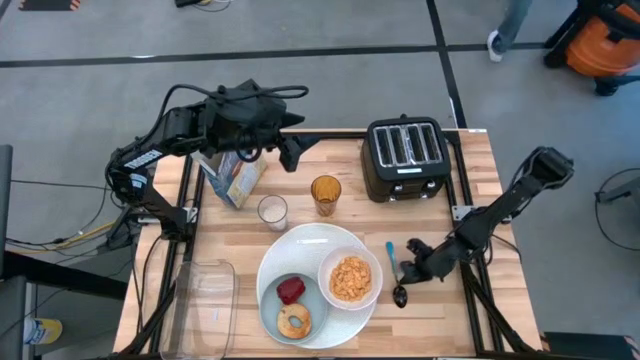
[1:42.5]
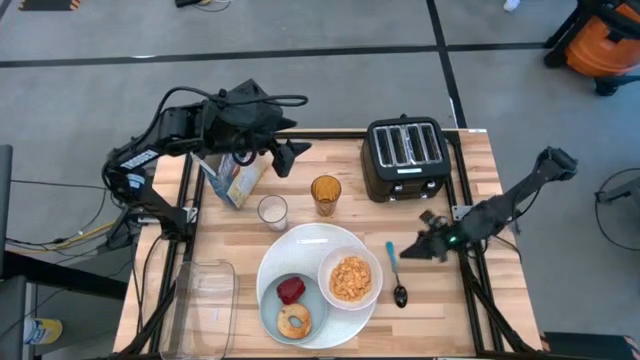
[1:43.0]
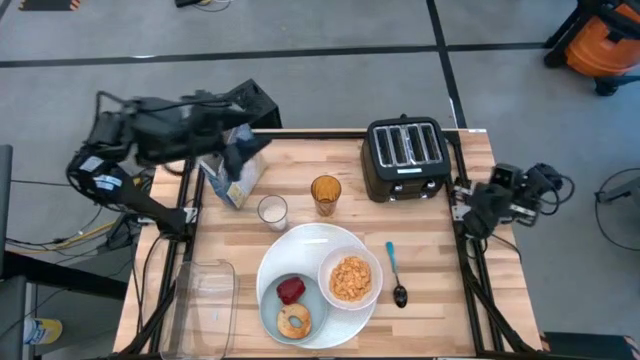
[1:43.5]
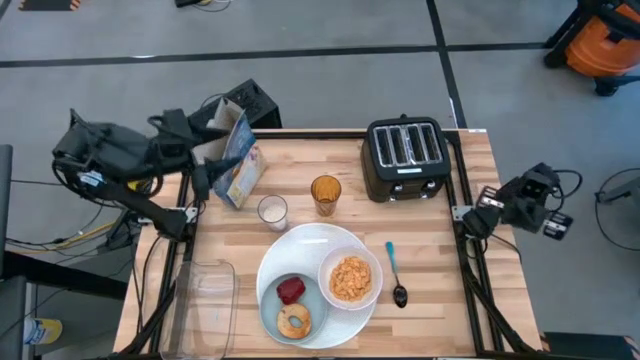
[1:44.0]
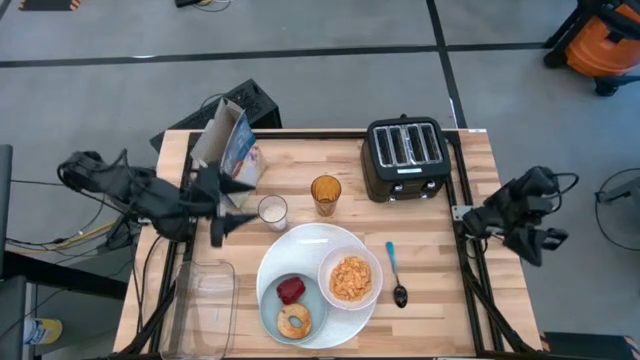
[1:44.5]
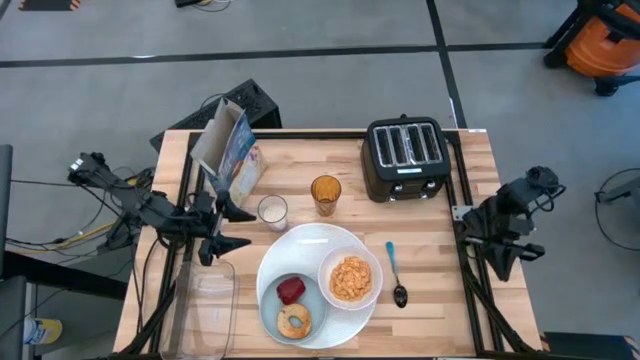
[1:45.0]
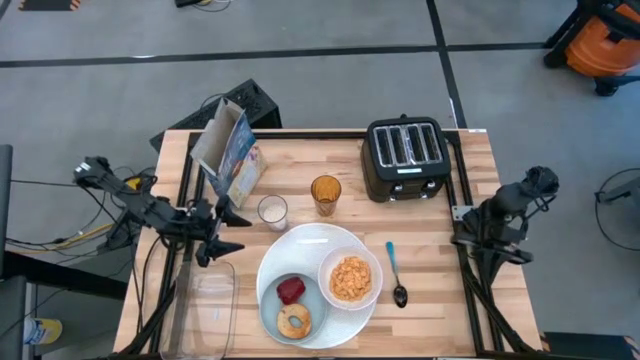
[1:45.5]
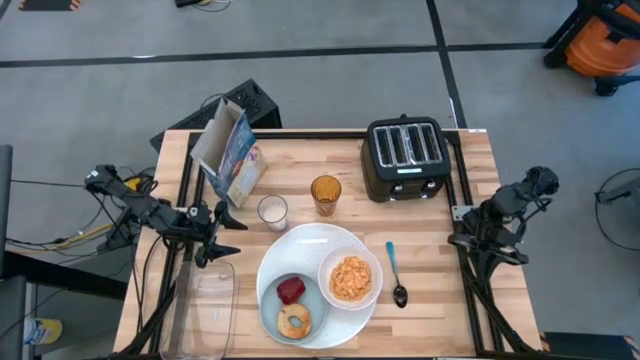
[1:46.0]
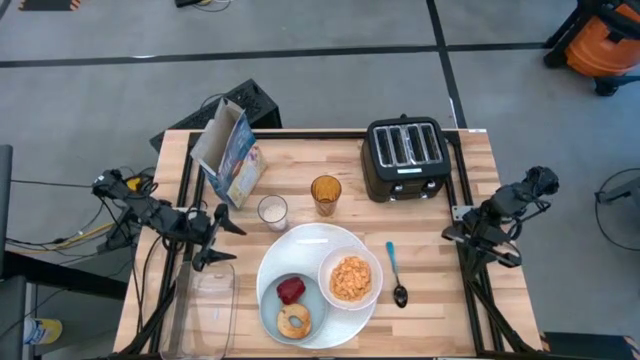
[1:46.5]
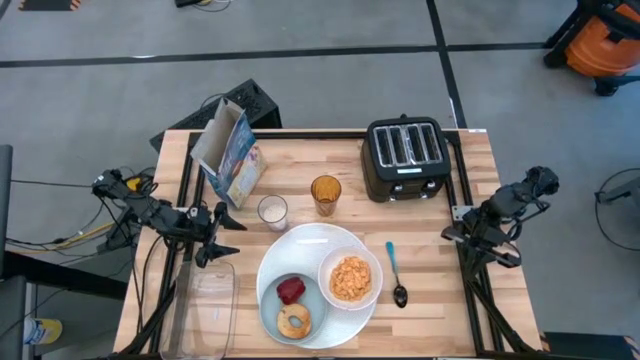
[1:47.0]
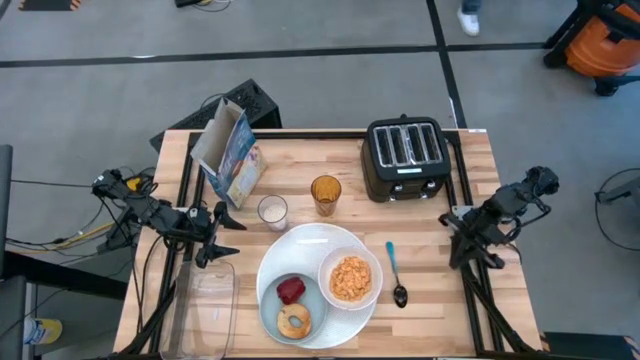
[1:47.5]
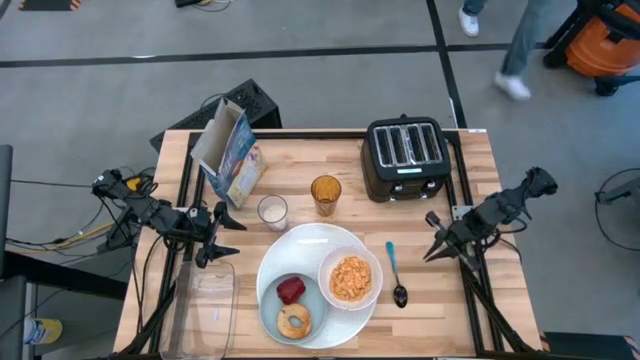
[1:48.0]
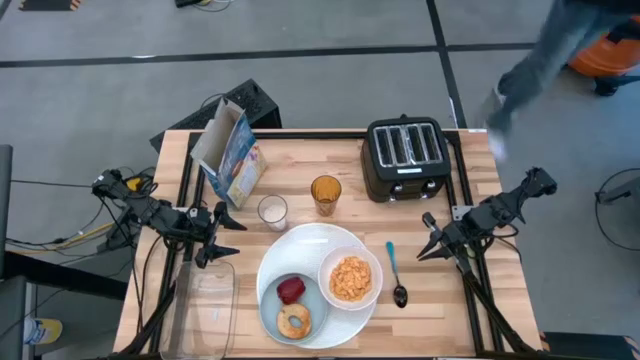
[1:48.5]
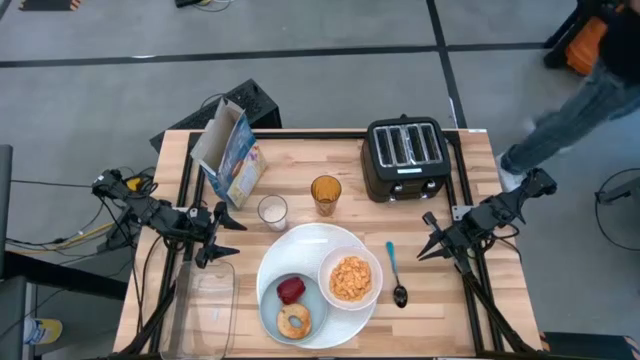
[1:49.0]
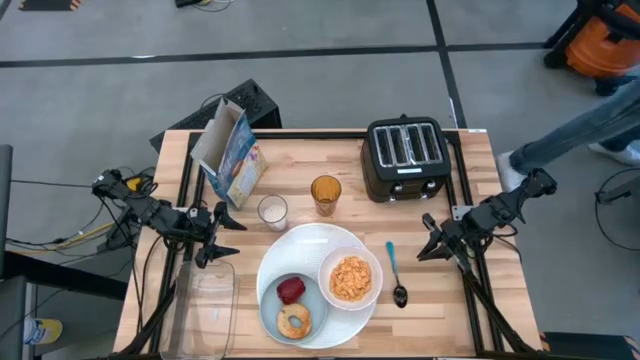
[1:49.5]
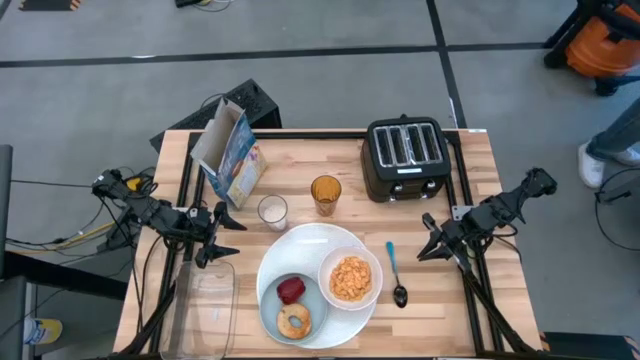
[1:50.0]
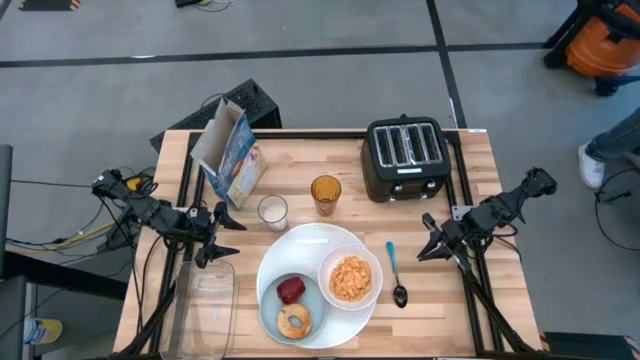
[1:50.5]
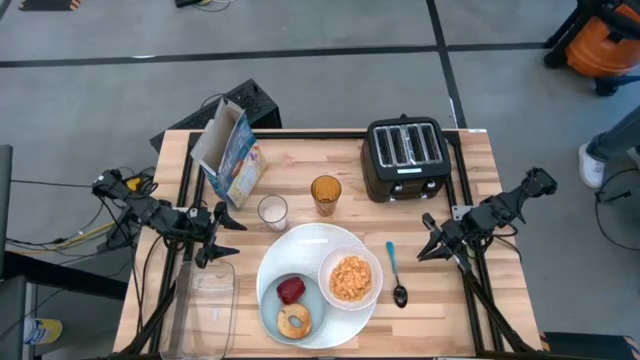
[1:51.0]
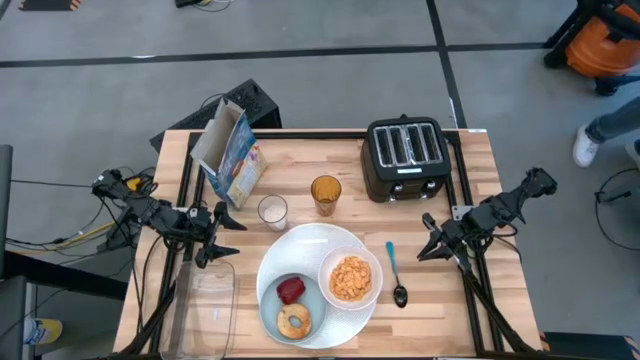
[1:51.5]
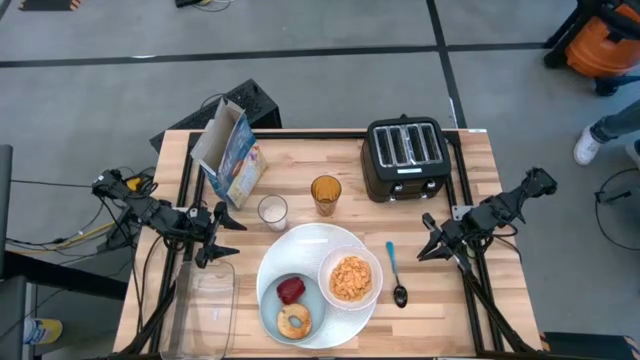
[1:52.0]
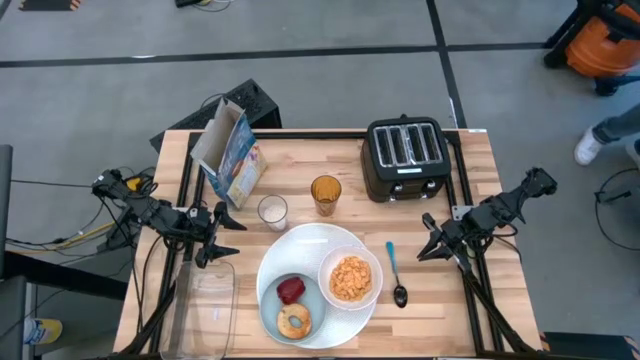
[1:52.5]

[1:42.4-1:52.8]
Task: Arrange a breakfast setting
Return to Home Position

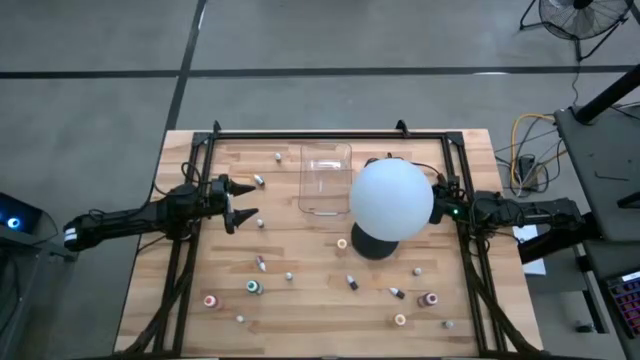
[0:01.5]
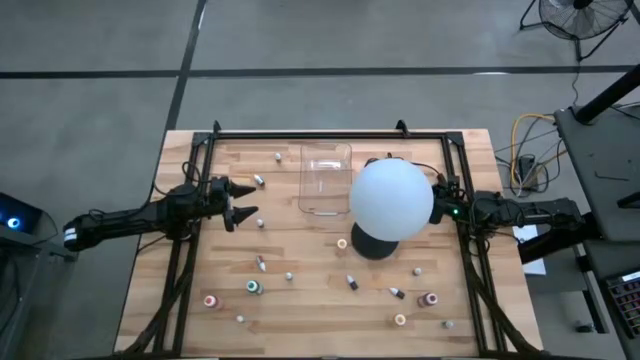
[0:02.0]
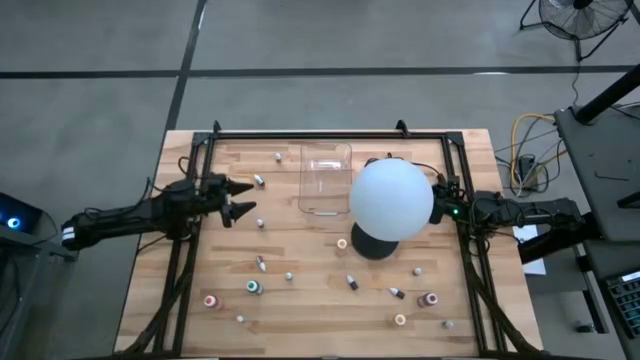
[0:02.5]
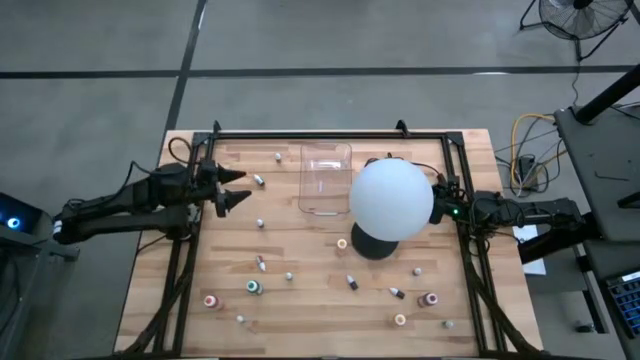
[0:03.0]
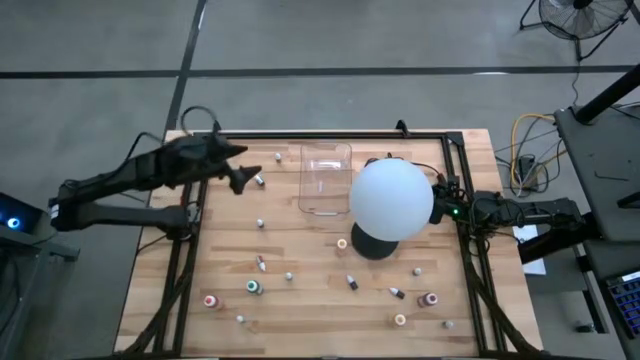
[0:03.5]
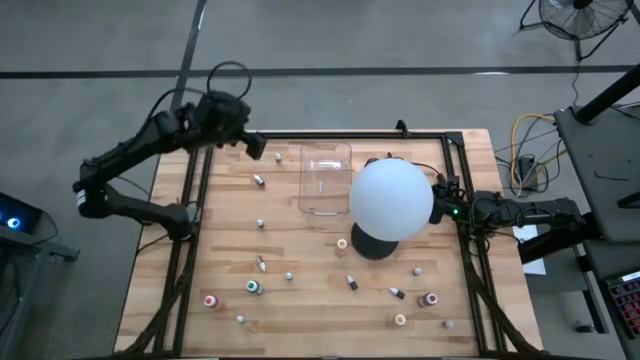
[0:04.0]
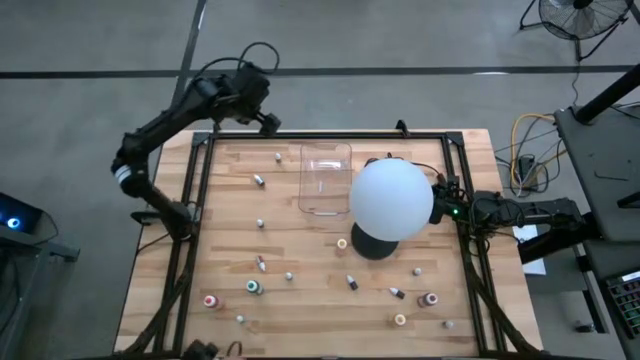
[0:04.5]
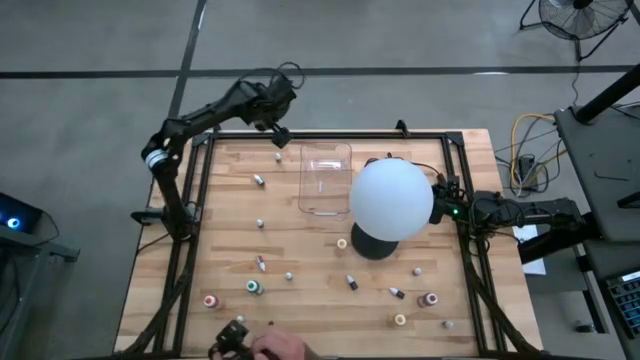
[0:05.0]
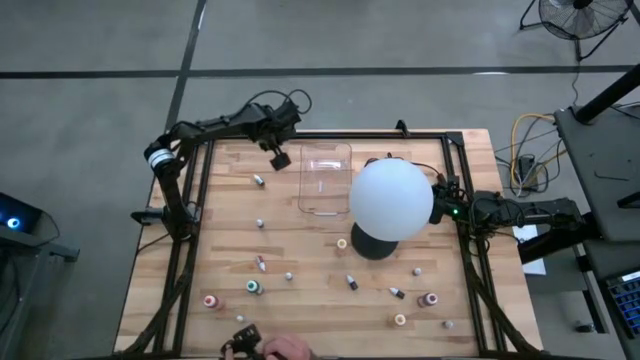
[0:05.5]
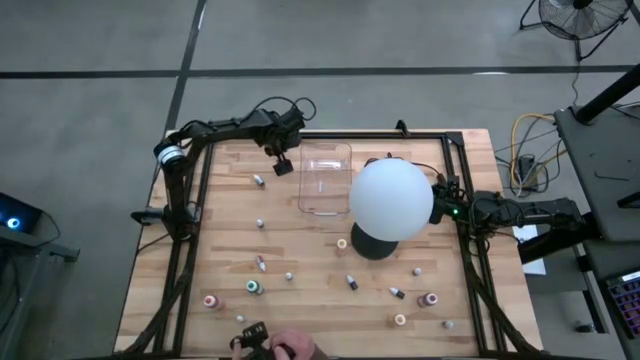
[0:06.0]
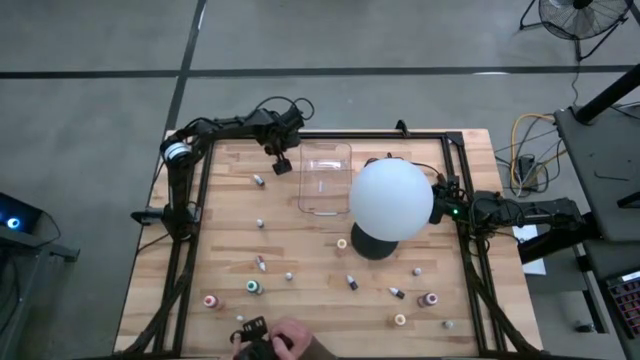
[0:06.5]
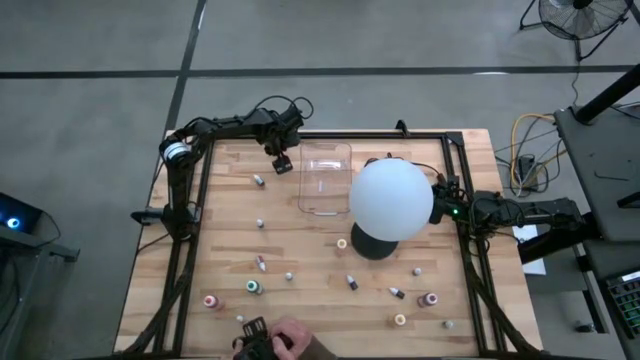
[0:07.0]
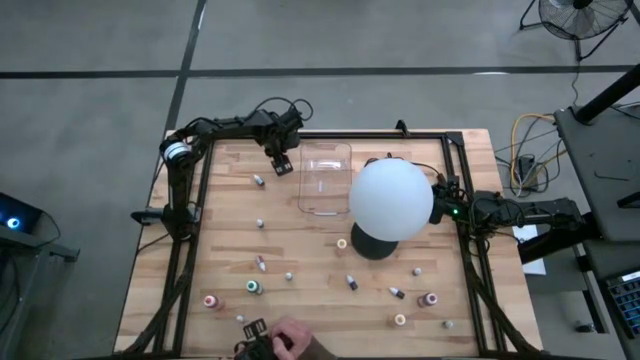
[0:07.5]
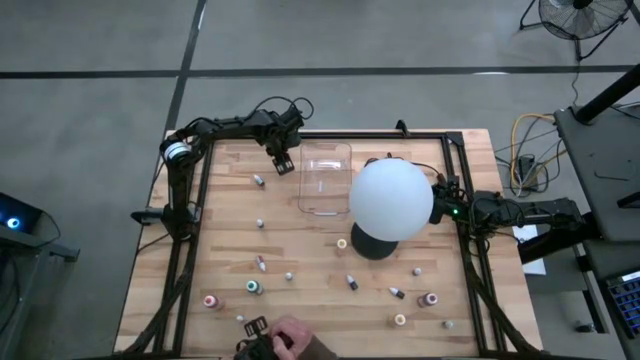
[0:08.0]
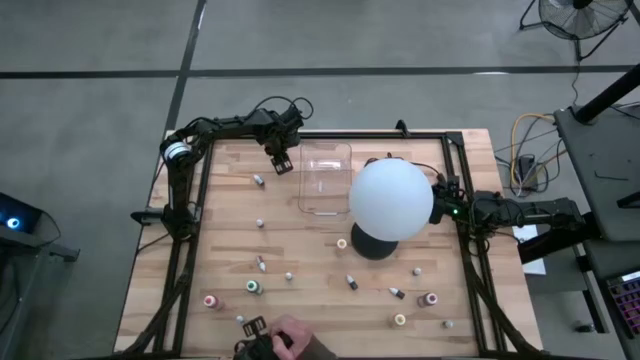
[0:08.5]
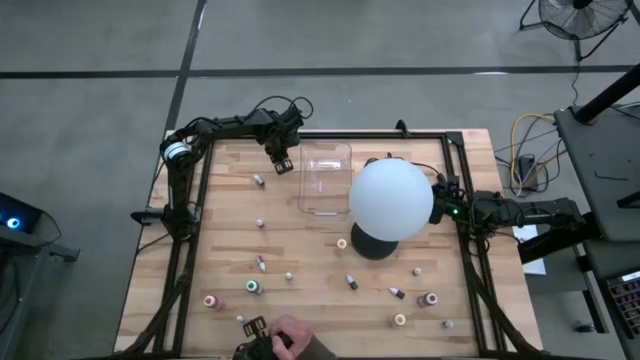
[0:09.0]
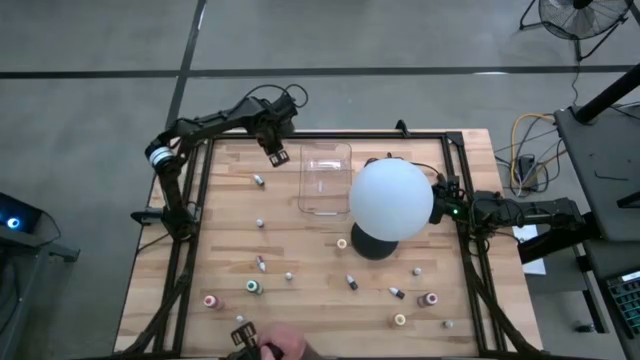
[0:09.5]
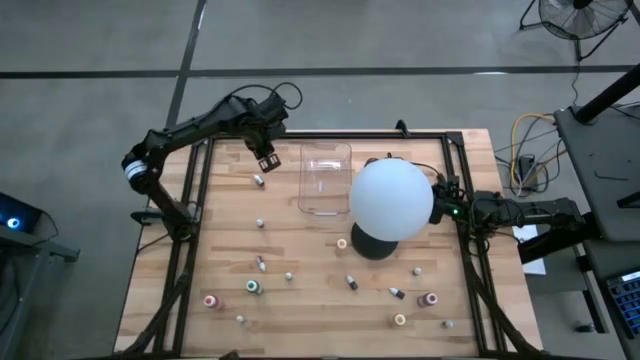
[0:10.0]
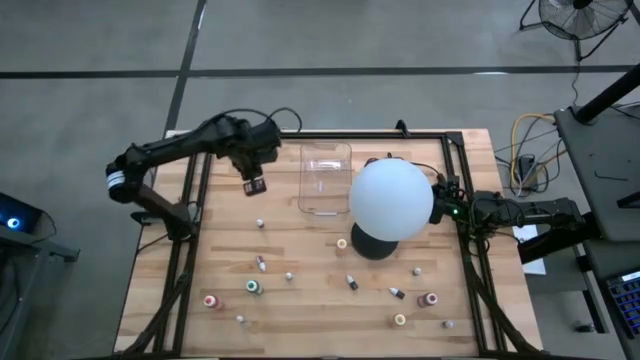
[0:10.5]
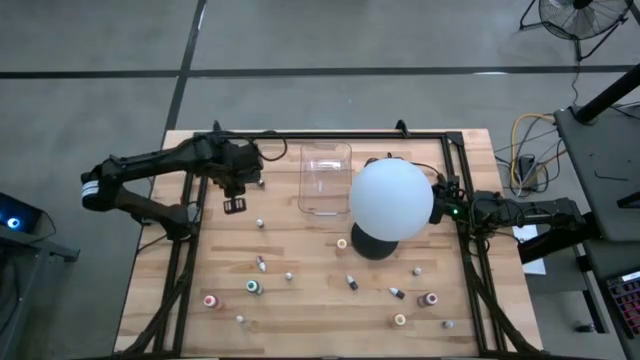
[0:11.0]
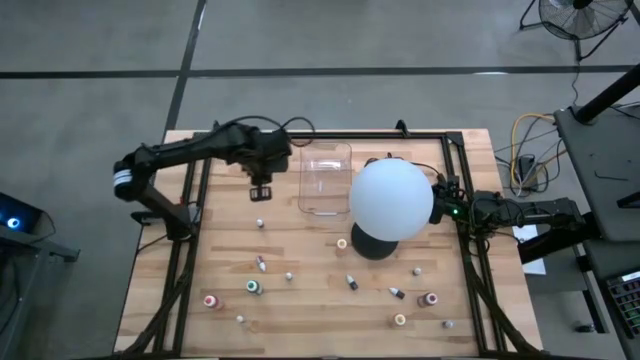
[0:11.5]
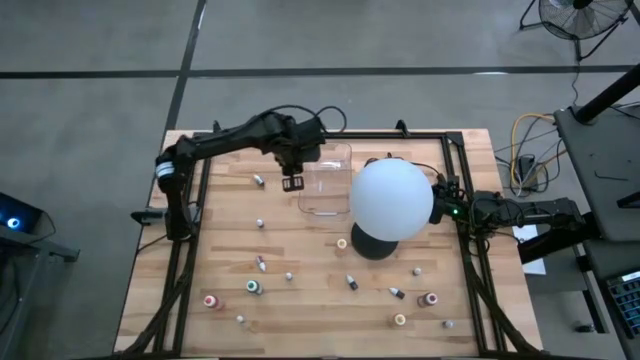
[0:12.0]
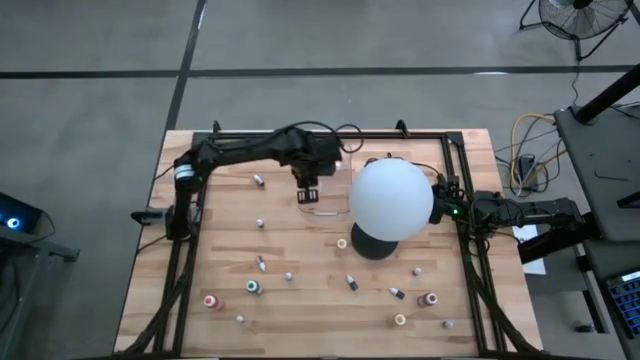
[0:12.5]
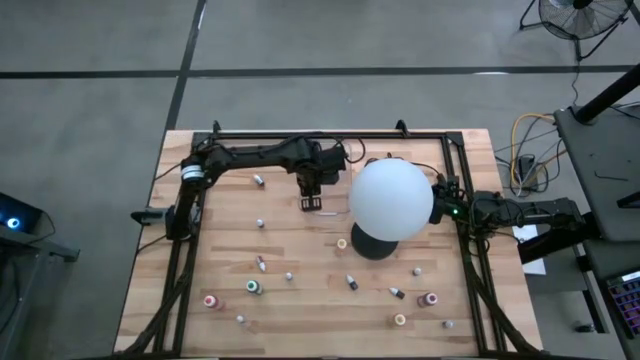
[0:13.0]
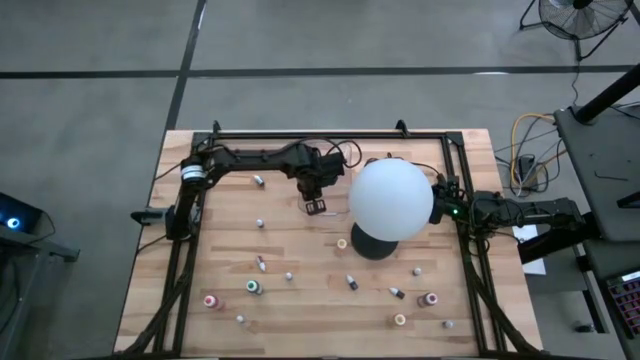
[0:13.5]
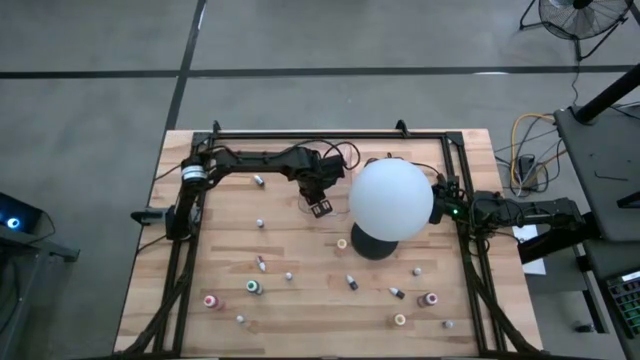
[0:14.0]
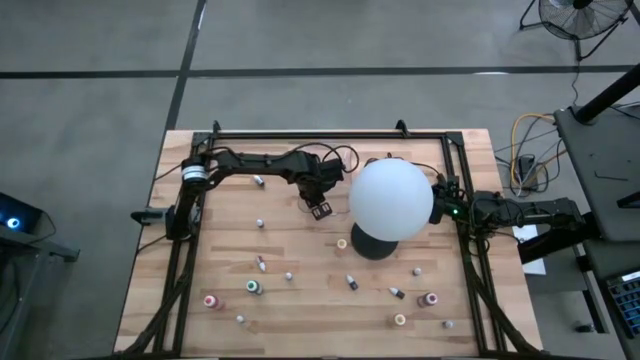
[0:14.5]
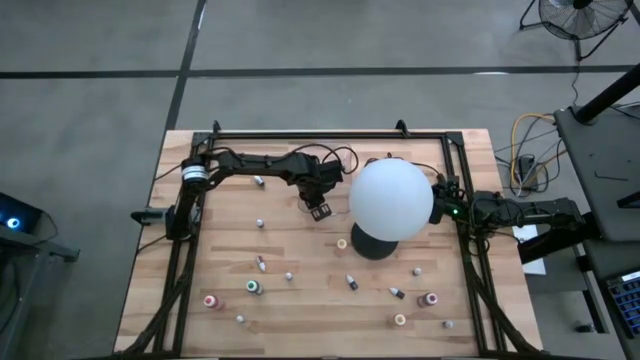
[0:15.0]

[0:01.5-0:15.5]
Task: Pick & Place food coloring
Put the small orange food coloring bottle into the transparent bin
